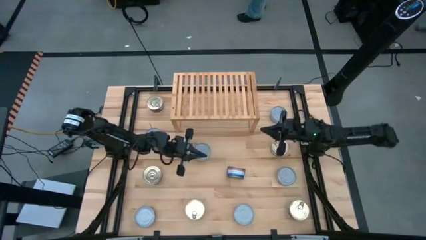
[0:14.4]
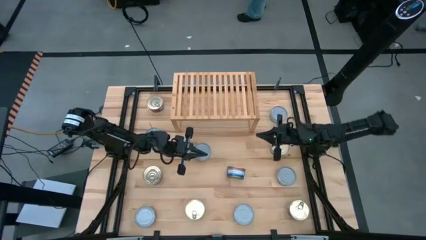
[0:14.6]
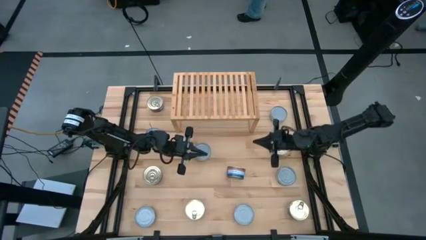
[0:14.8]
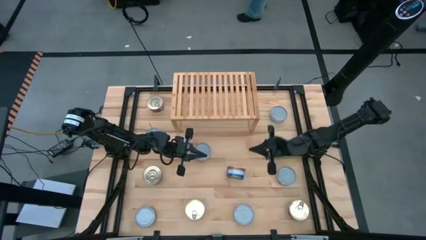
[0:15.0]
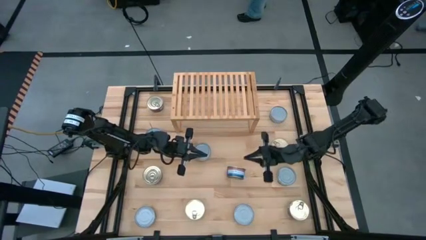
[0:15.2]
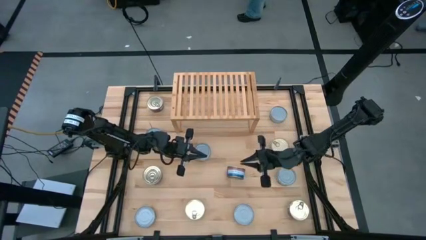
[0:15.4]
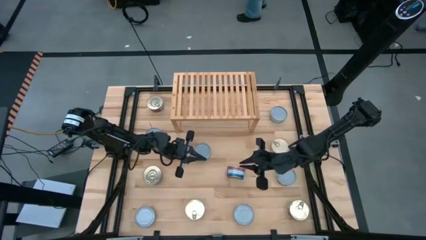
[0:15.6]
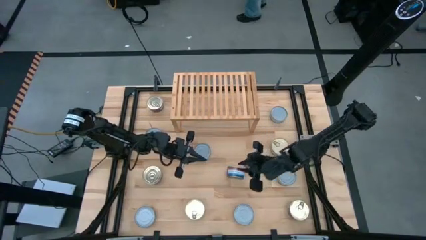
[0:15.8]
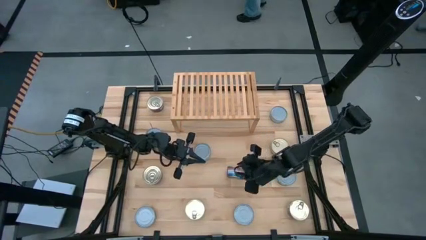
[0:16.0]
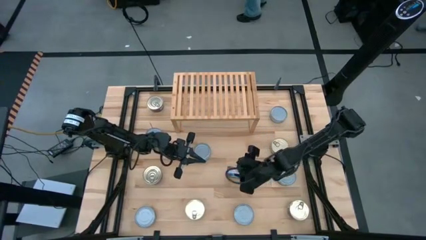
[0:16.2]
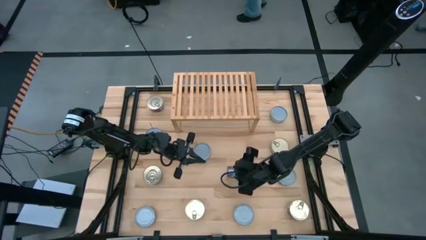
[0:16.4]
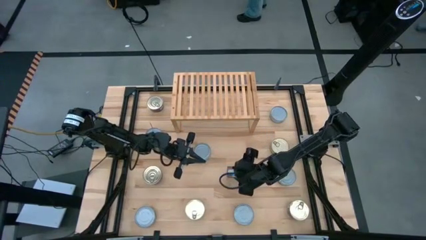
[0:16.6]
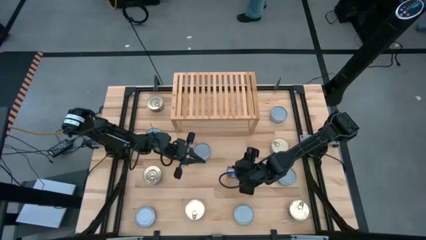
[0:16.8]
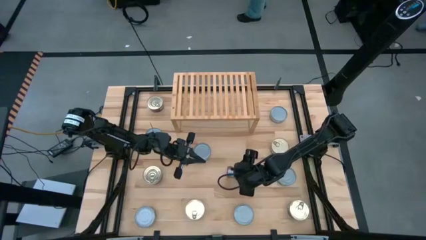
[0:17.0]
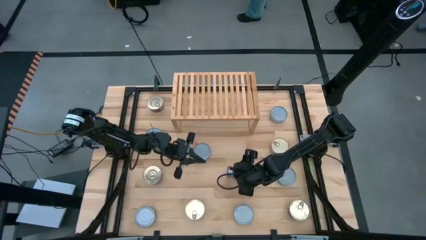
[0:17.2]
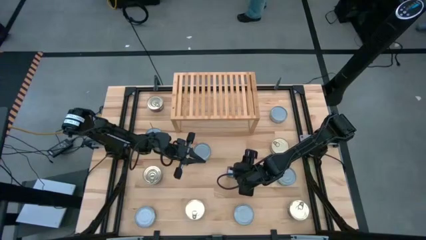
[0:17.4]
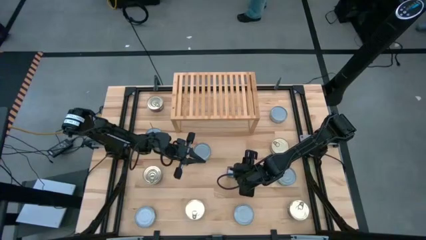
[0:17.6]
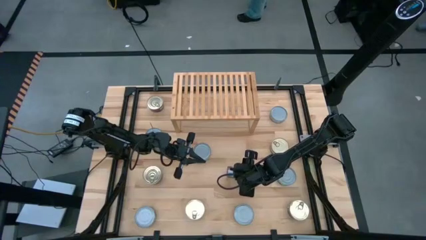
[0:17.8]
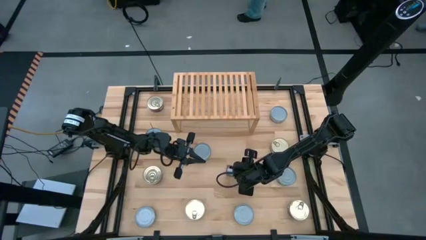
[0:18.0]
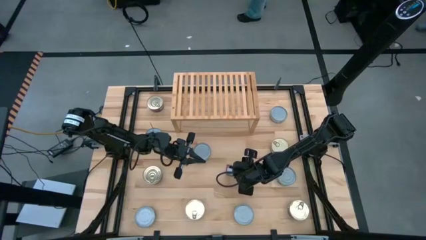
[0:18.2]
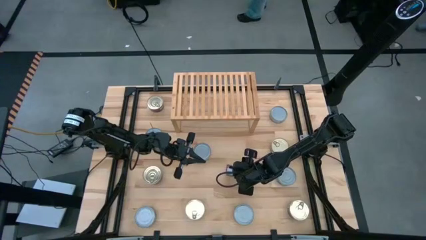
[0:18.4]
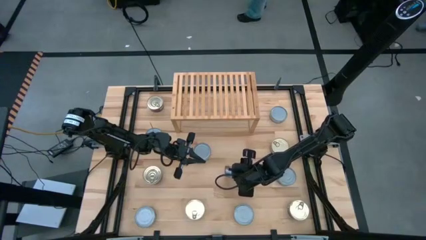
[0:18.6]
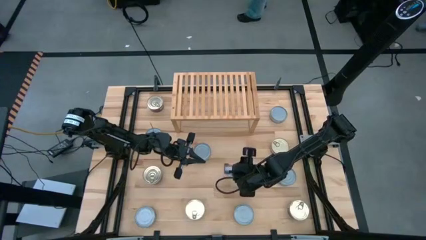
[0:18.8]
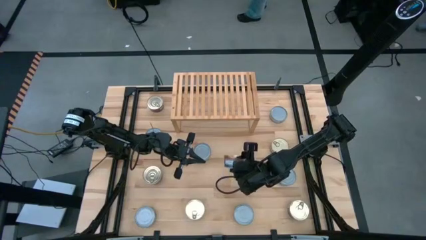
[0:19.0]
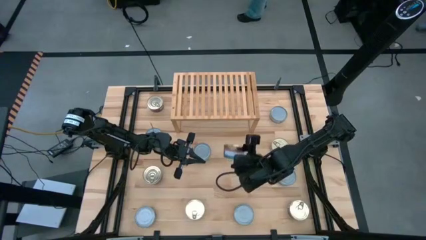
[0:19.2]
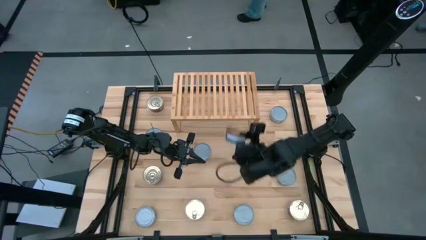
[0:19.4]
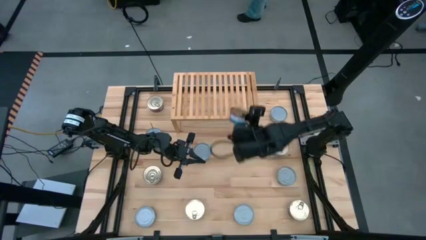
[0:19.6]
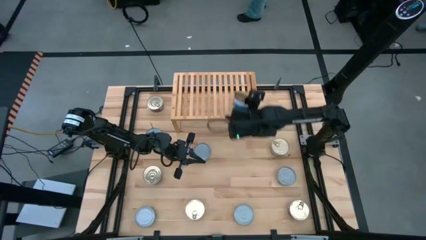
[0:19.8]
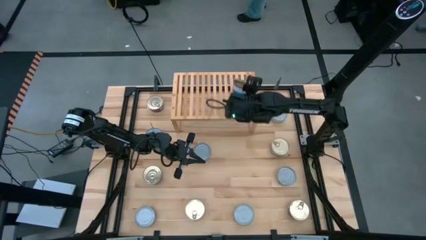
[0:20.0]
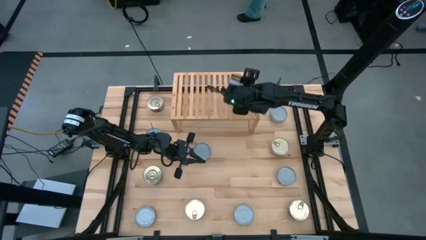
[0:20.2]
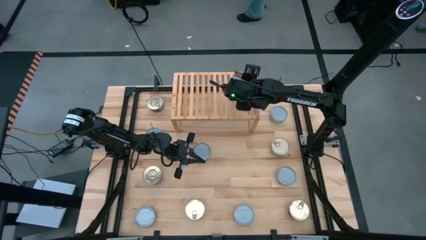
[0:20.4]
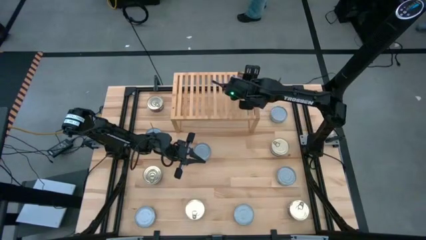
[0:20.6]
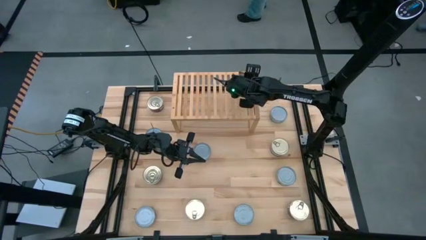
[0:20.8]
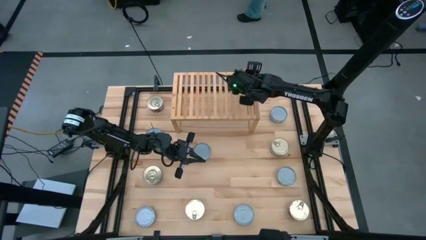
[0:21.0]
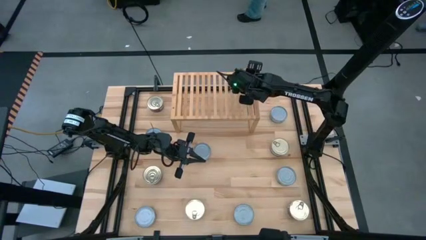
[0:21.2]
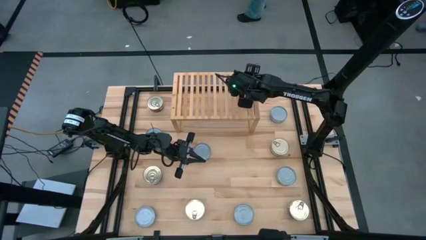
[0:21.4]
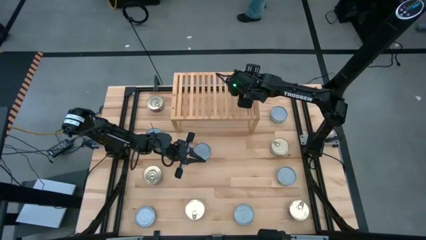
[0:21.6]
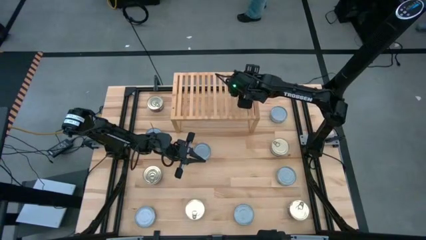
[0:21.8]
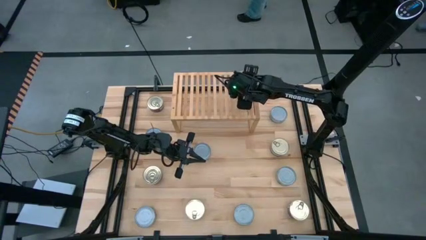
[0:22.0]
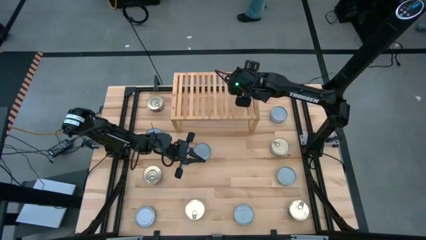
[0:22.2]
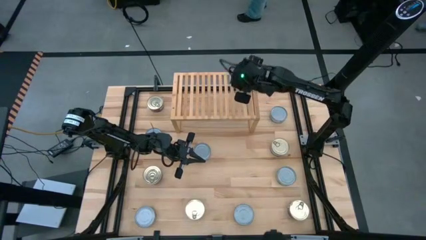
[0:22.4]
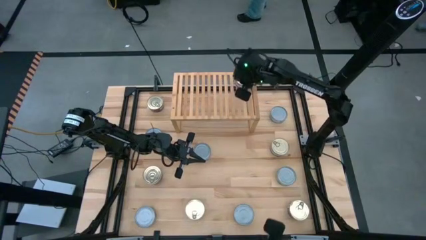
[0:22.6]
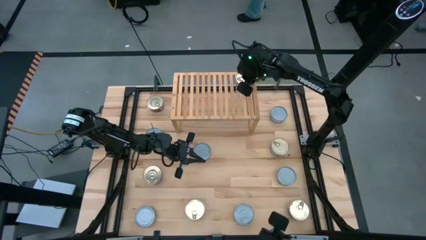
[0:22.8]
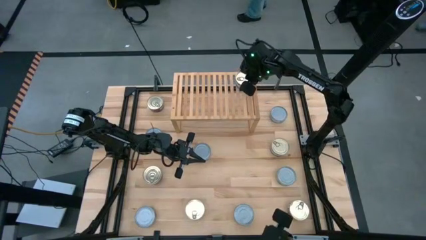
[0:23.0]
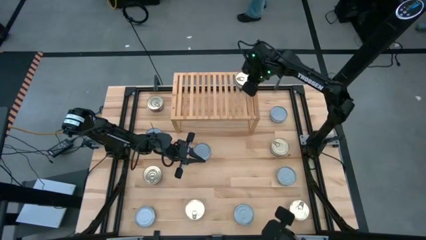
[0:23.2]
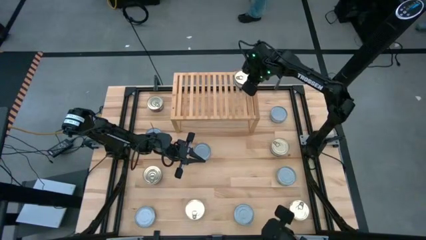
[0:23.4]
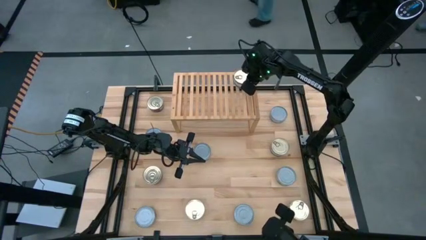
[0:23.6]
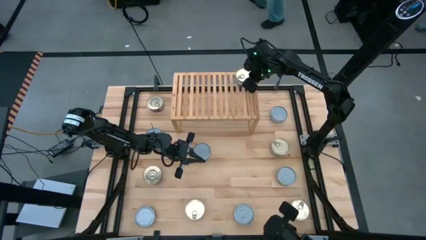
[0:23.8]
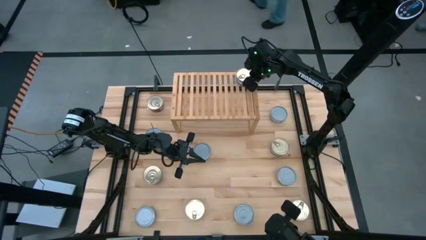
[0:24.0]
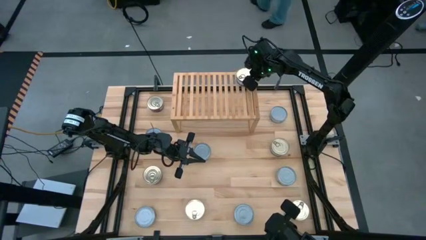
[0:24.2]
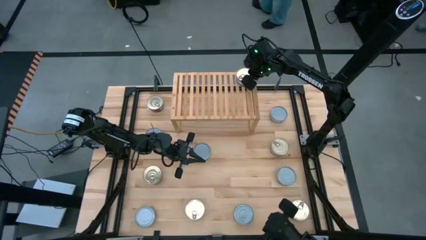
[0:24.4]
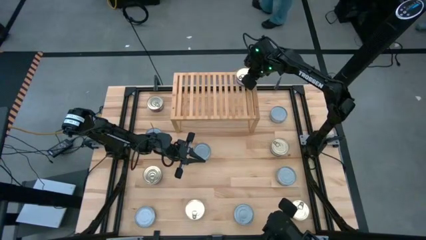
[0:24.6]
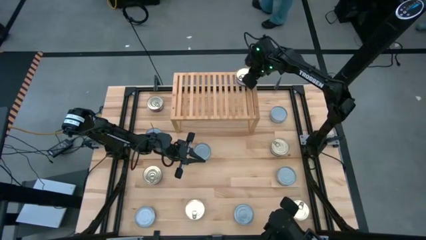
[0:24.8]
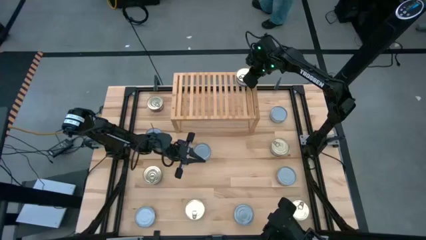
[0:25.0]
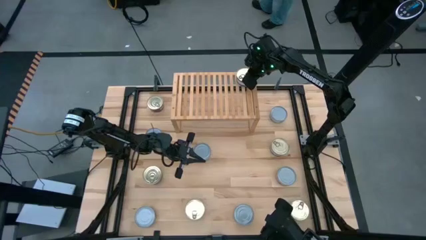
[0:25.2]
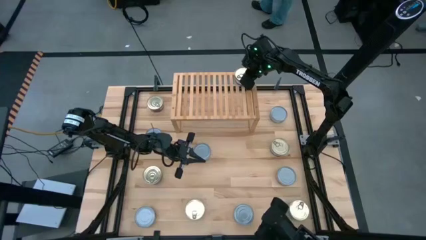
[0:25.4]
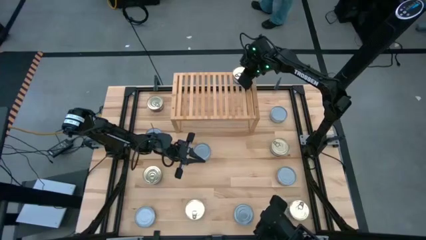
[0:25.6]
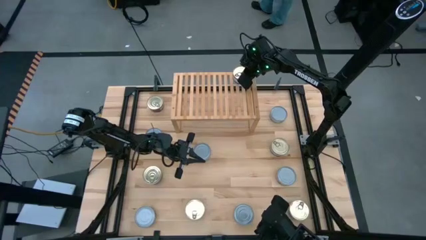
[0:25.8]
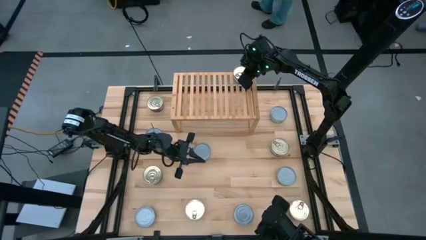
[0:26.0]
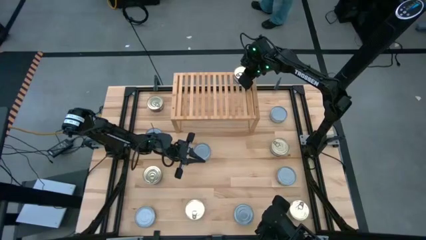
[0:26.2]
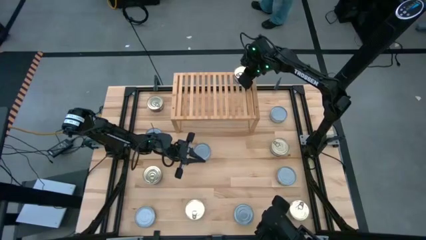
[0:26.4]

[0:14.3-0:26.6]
Task: Stack canned seafood by type on shelf
Put the blue tuna can on the shelf

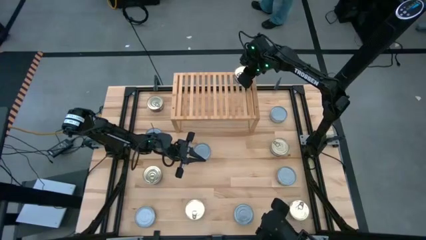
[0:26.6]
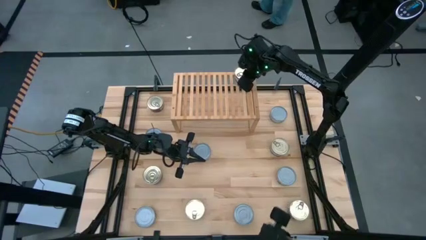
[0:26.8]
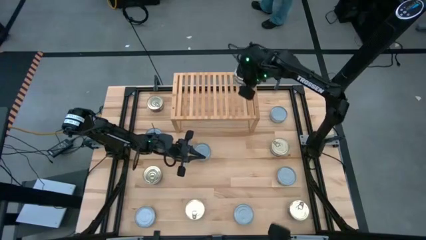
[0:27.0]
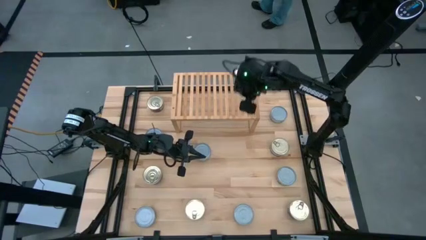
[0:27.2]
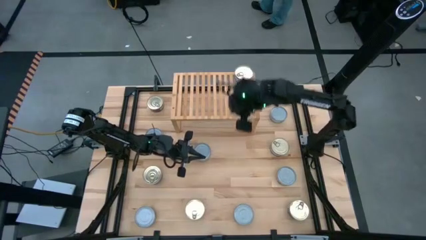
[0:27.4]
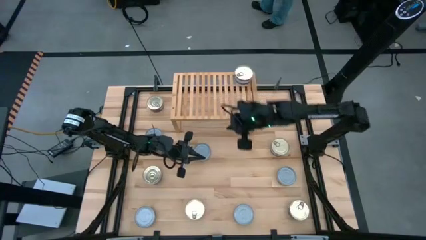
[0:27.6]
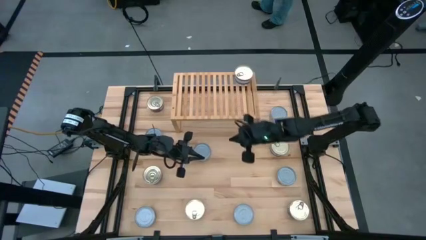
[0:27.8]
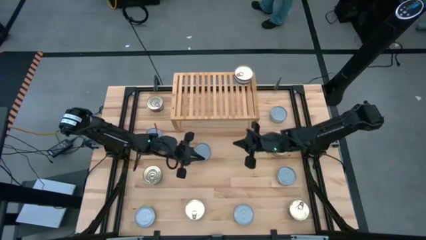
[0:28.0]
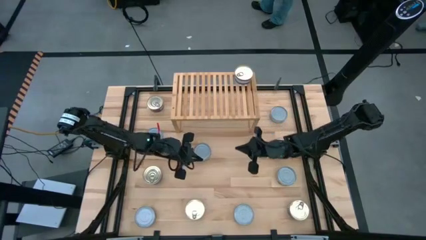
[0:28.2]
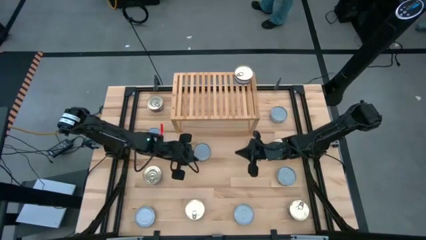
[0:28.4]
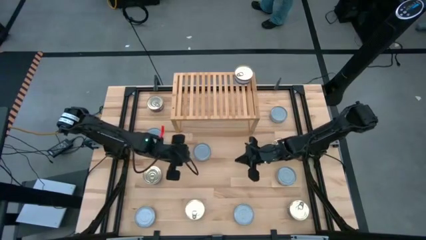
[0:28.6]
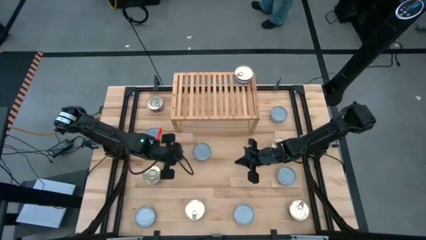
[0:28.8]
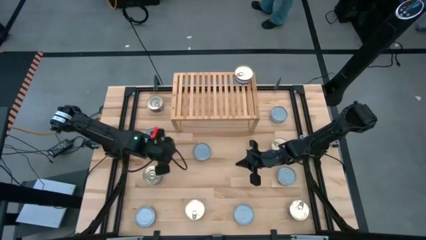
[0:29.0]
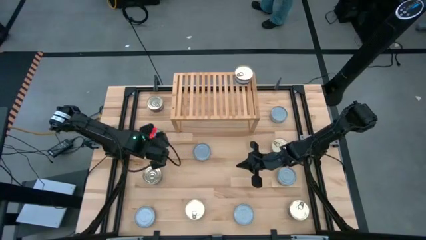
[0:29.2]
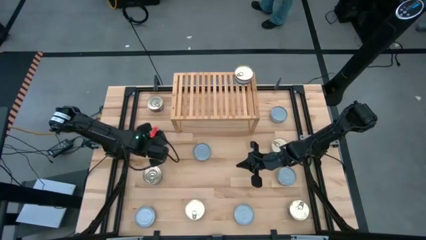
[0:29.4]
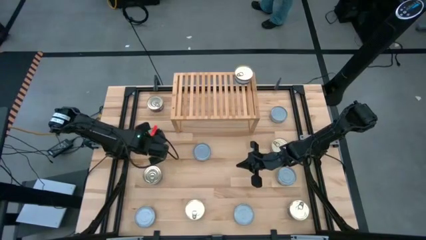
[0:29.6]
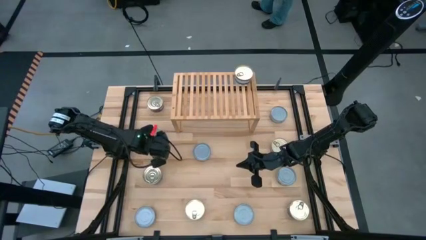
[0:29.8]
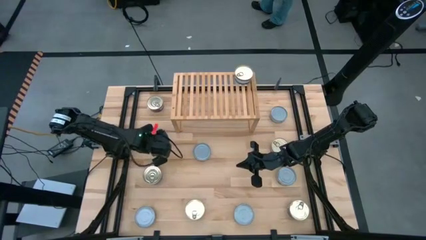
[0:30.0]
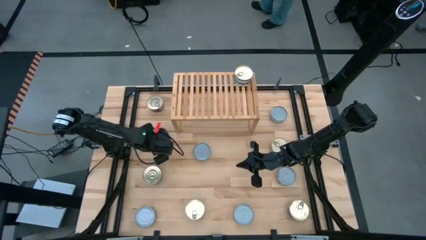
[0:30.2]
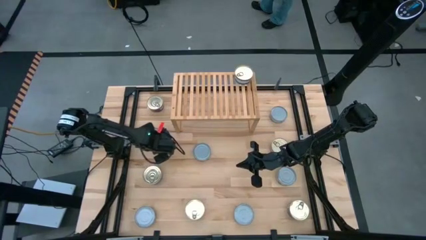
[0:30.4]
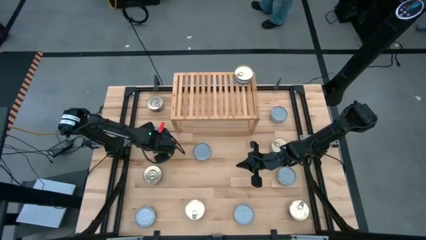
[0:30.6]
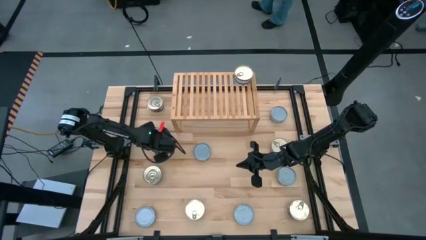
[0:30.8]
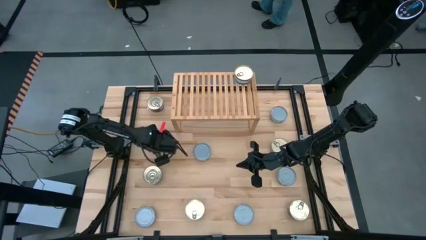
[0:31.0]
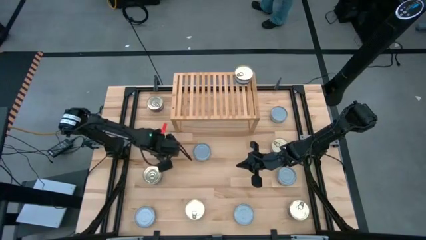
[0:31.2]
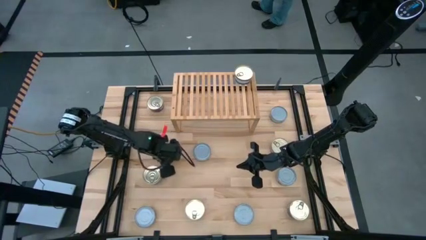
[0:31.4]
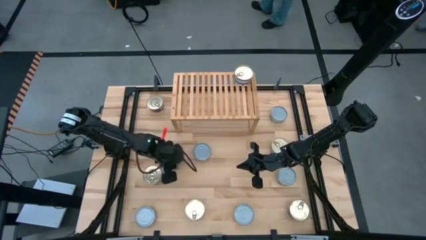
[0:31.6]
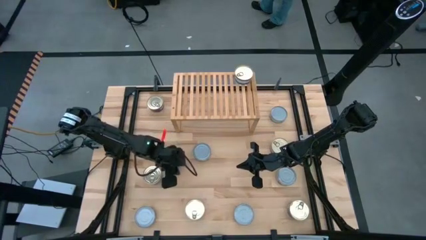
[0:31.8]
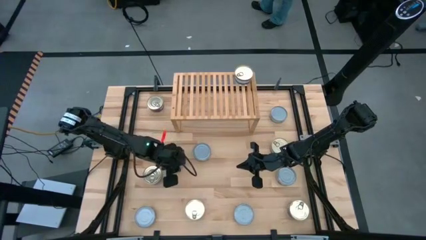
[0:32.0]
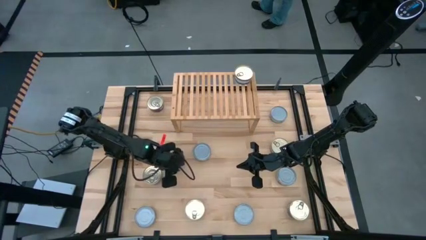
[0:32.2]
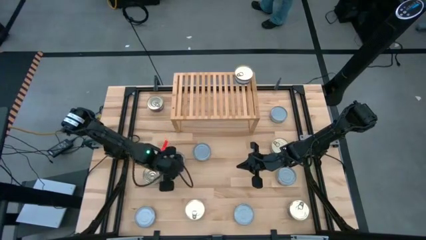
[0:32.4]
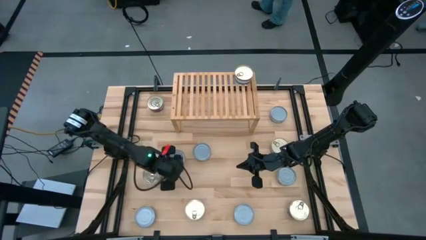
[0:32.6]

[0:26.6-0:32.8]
Put the green tuna can on the shelf
